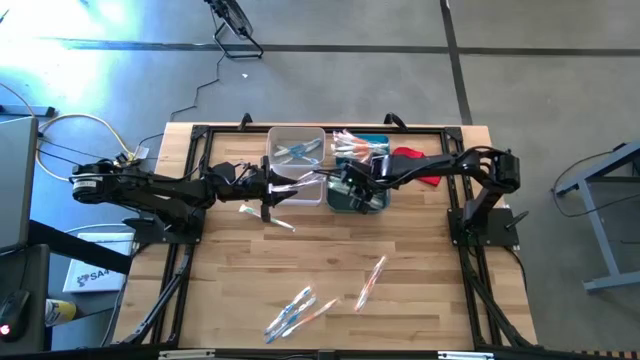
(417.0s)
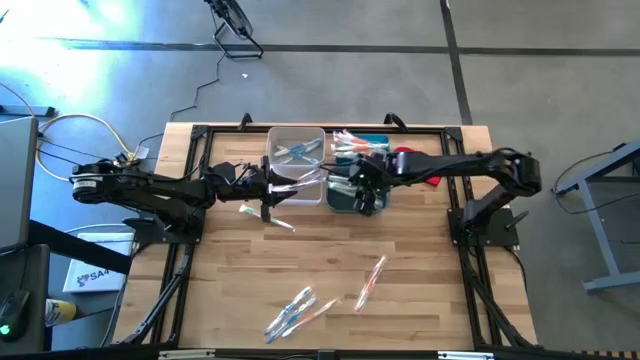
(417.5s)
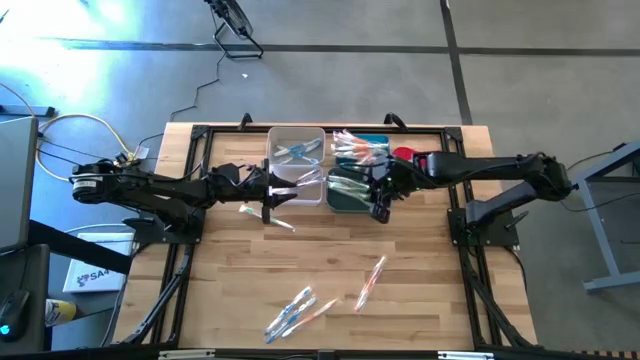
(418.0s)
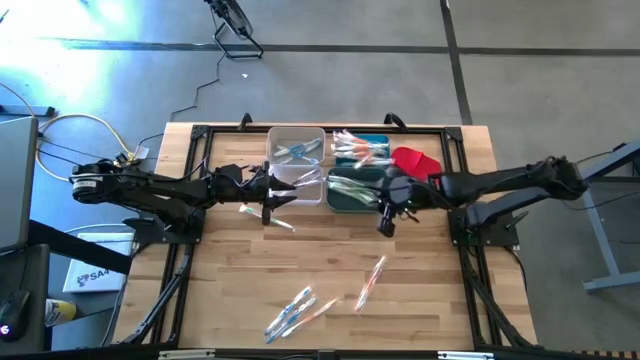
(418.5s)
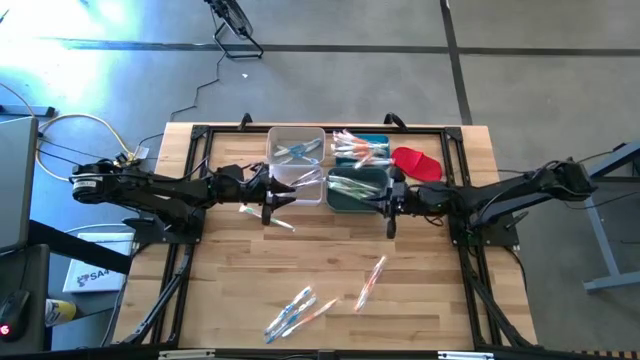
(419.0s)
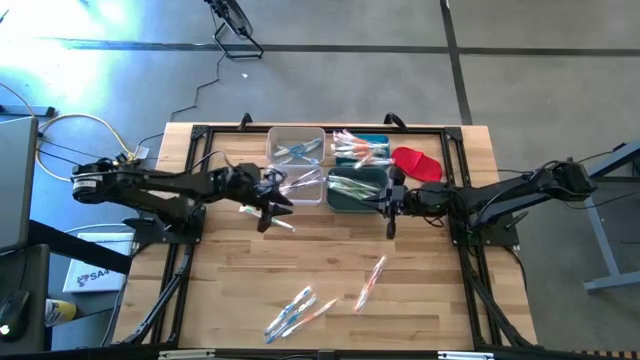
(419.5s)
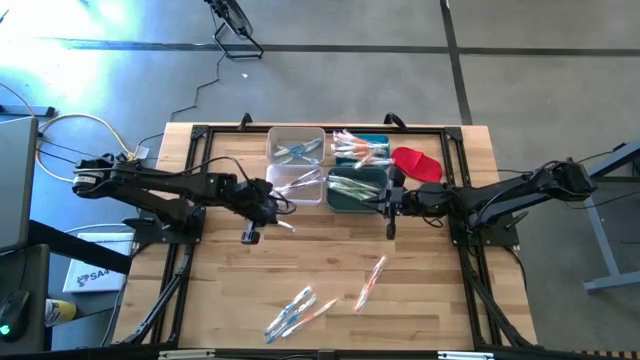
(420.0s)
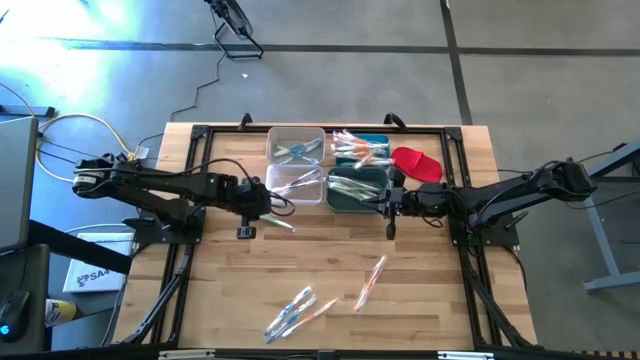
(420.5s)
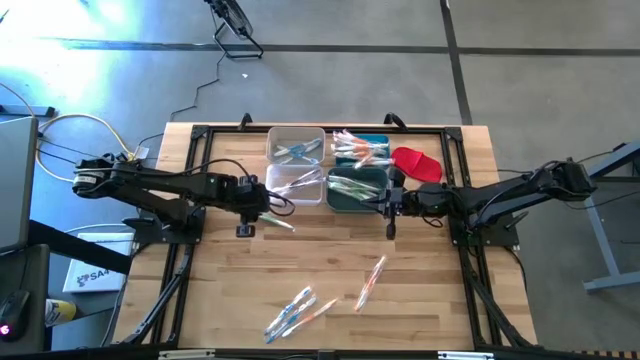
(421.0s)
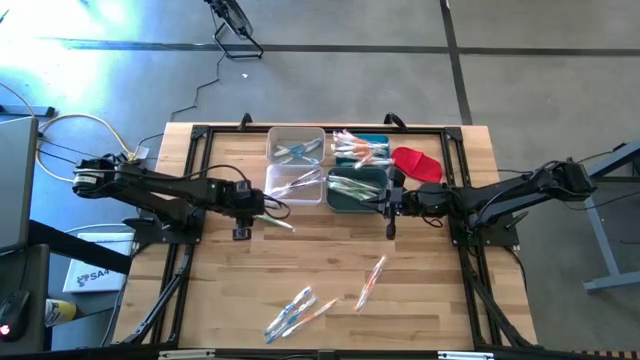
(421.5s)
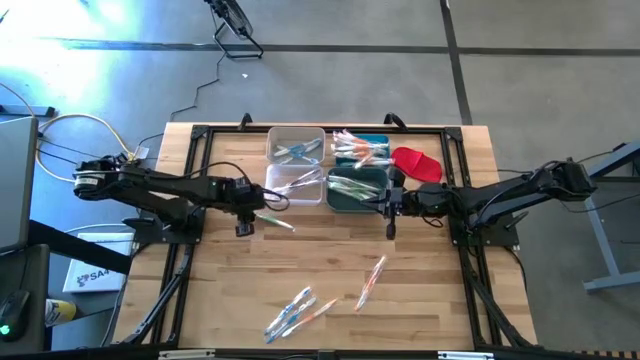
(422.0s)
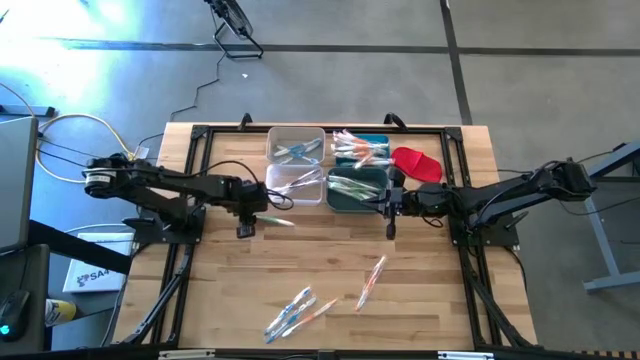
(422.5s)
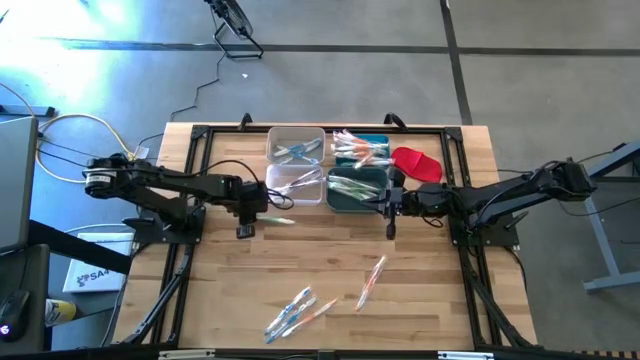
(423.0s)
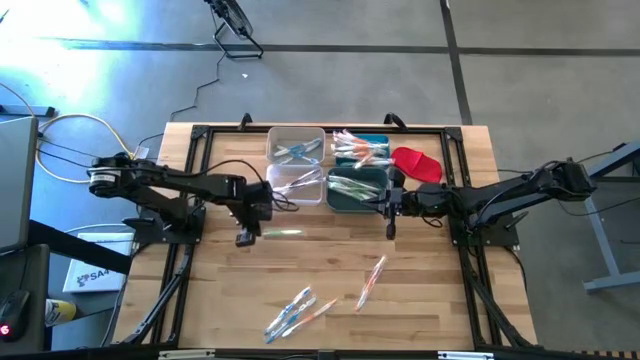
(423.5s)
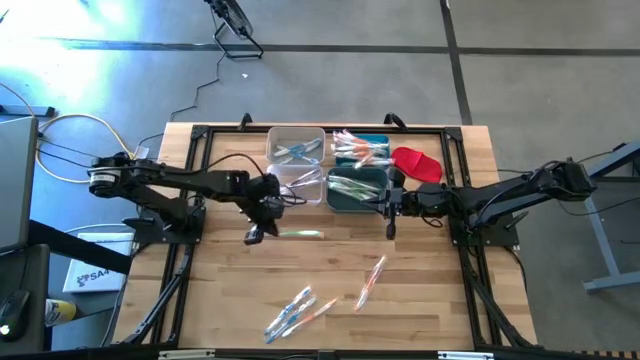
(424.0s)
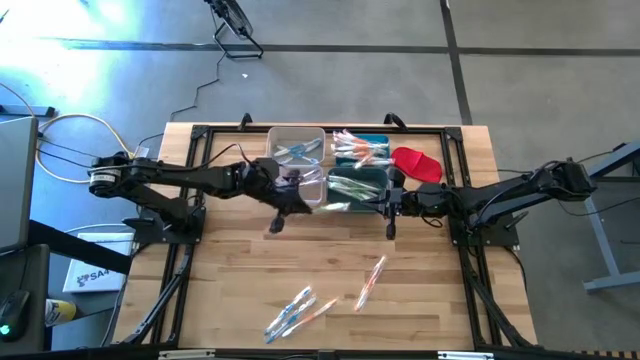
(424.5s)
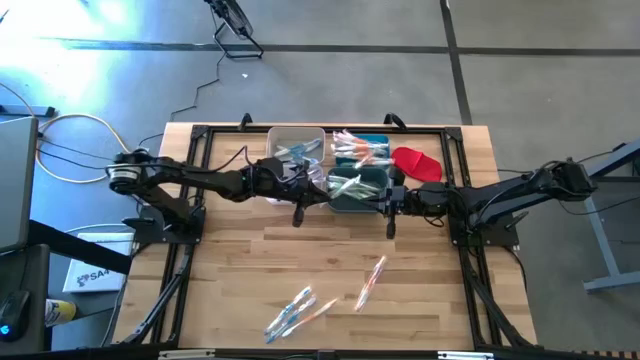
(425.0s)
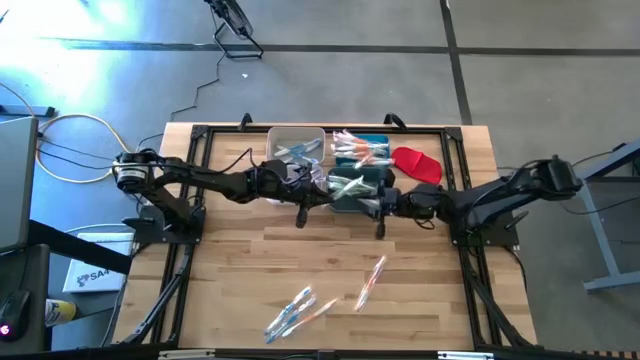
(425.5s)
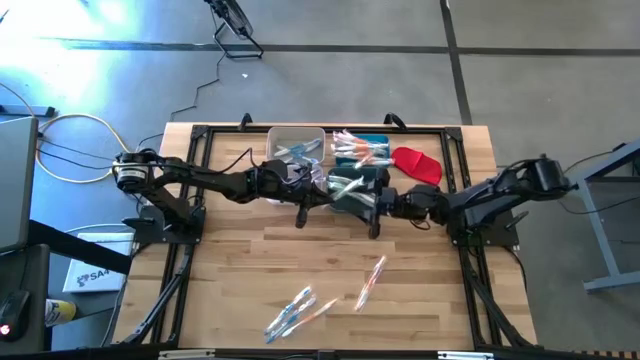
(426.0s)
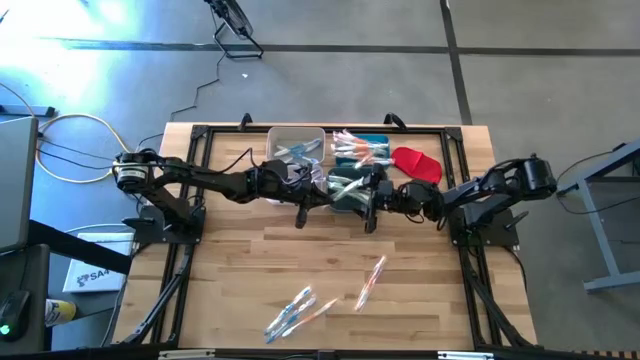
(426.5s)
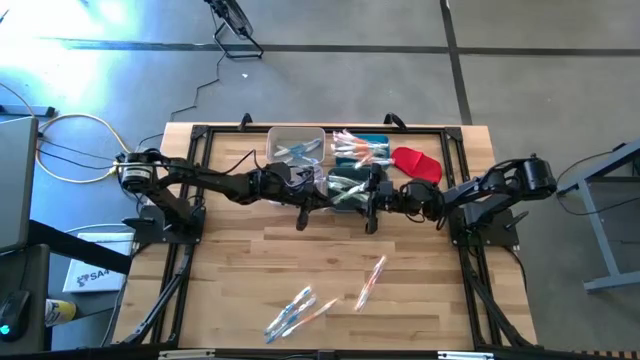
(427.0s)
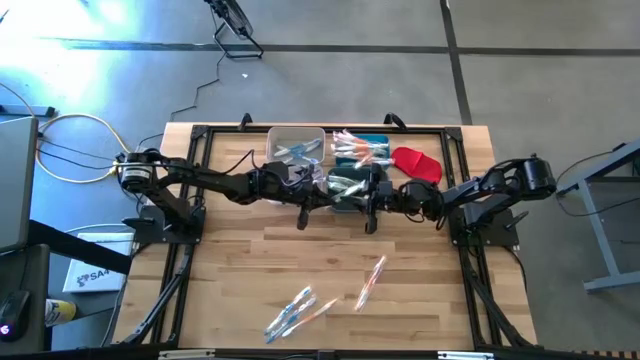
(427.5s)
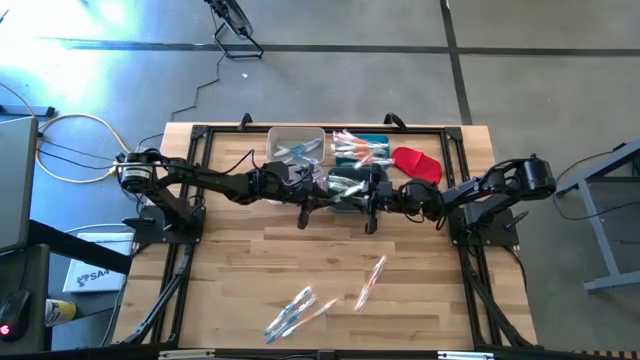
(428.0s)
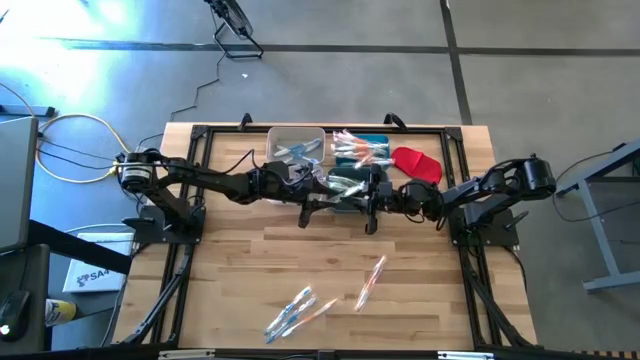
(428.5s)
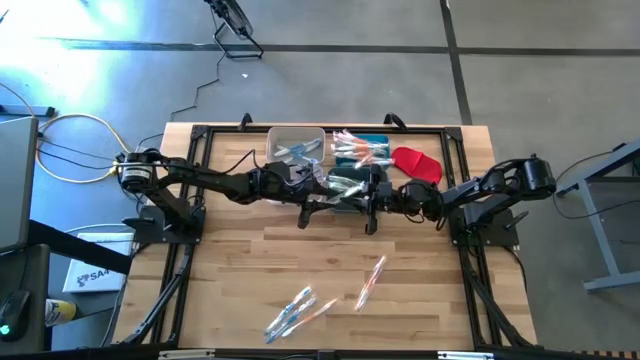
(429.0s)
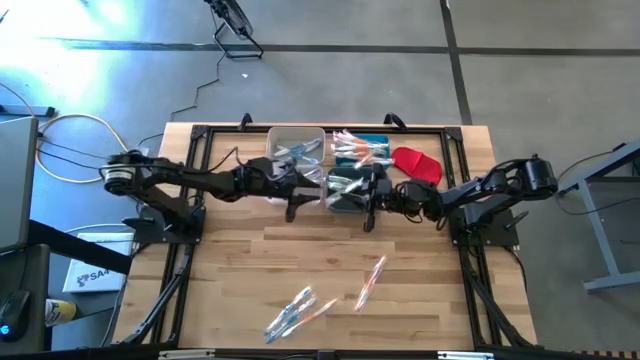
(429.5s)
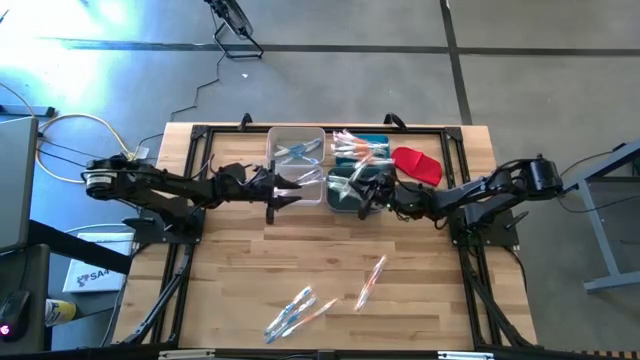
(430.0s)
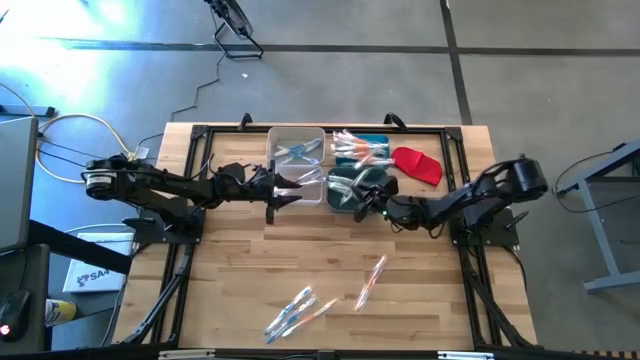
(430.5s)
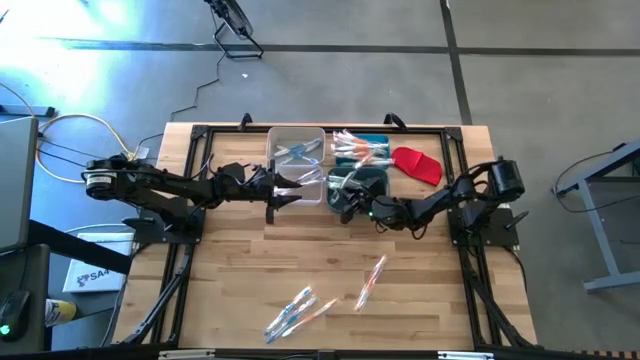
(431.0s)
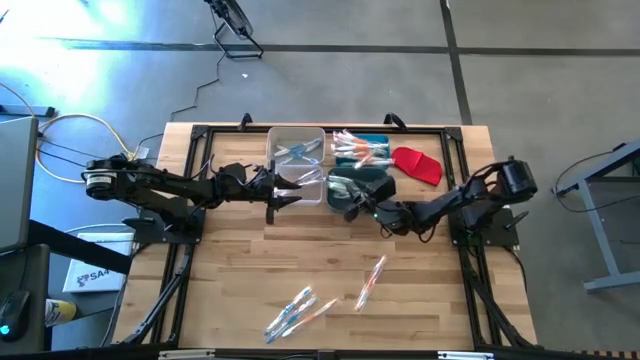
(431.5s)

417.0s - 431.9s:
Task: Pick & Place Toothbrushes
Put the green toothbrush into the green bin

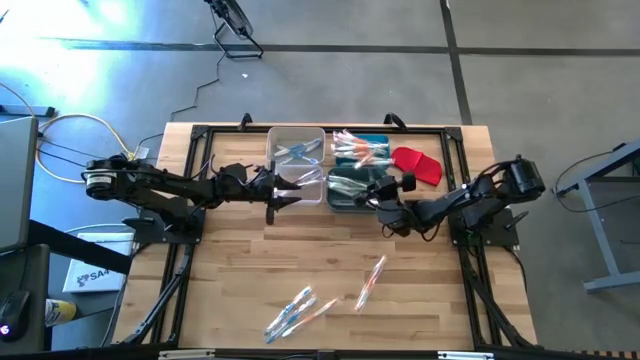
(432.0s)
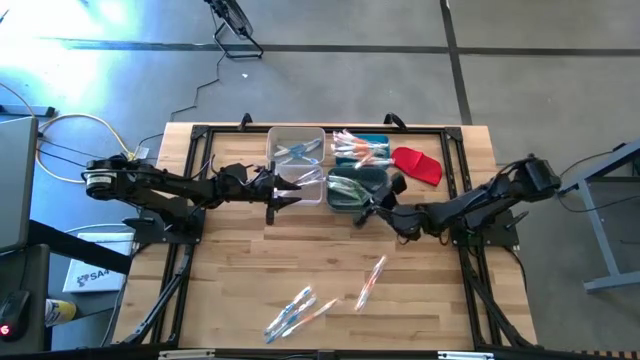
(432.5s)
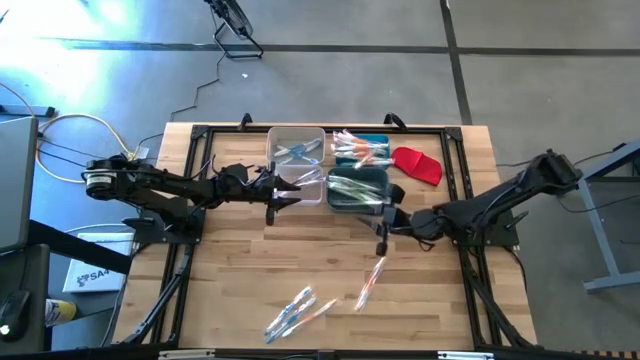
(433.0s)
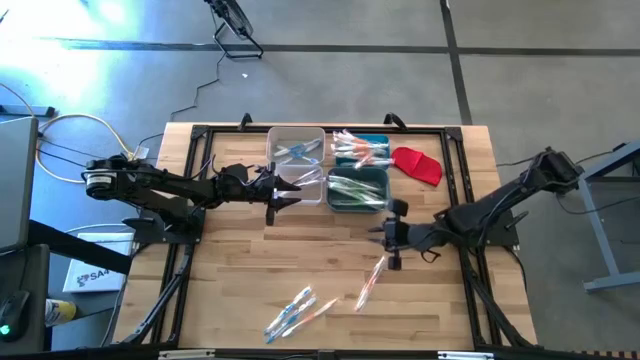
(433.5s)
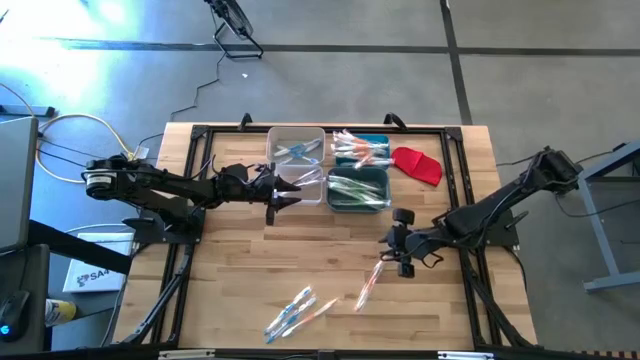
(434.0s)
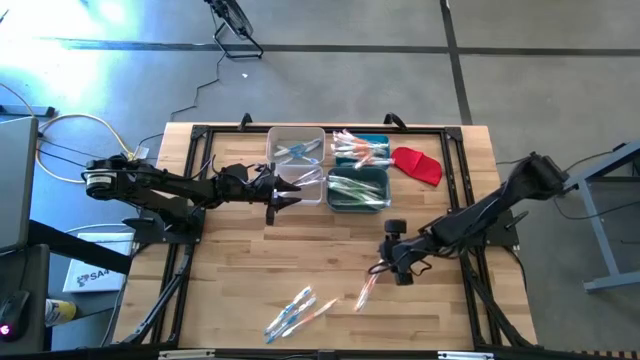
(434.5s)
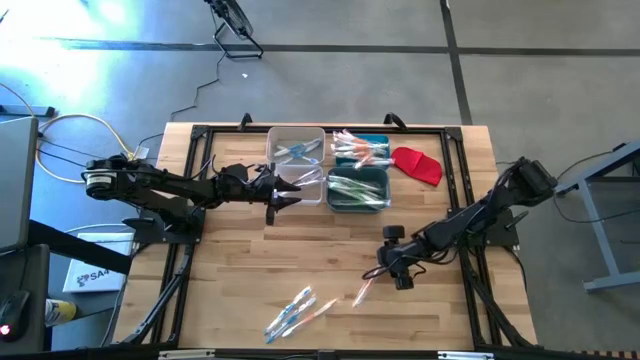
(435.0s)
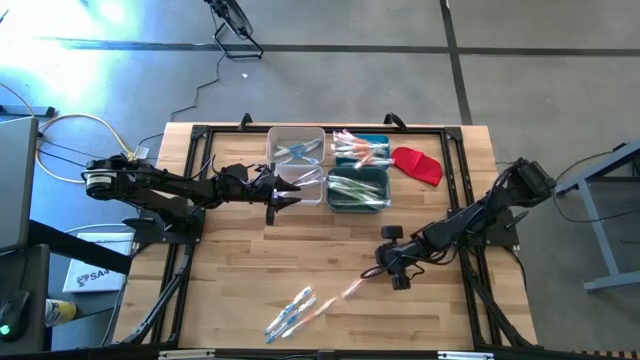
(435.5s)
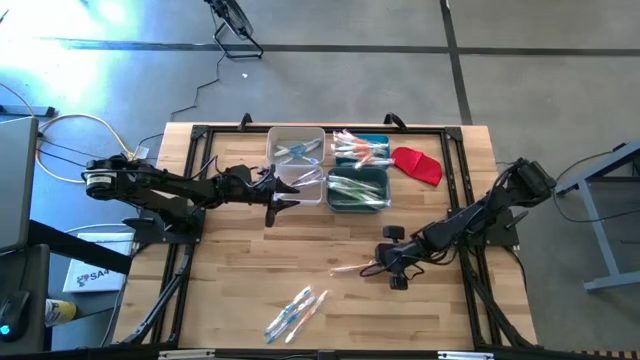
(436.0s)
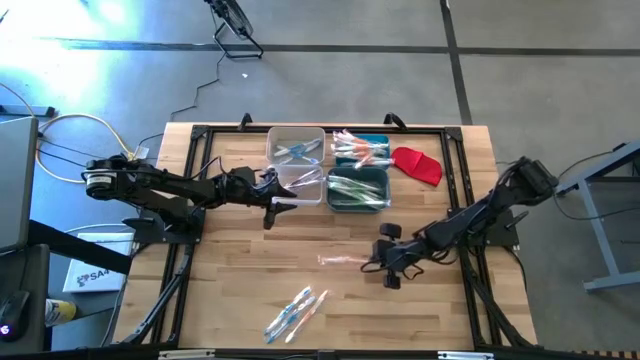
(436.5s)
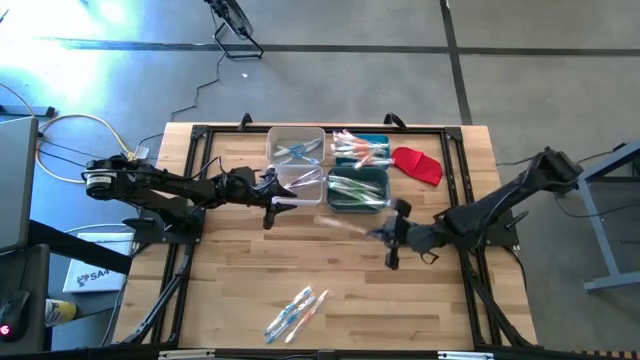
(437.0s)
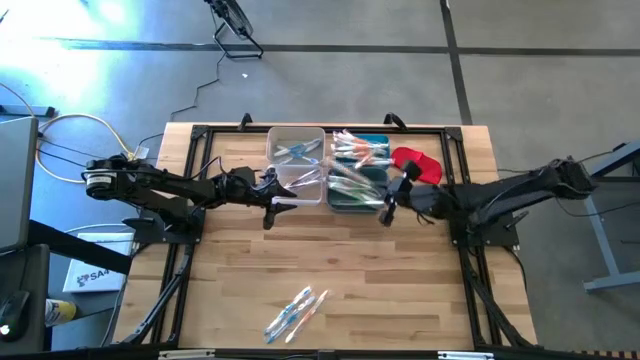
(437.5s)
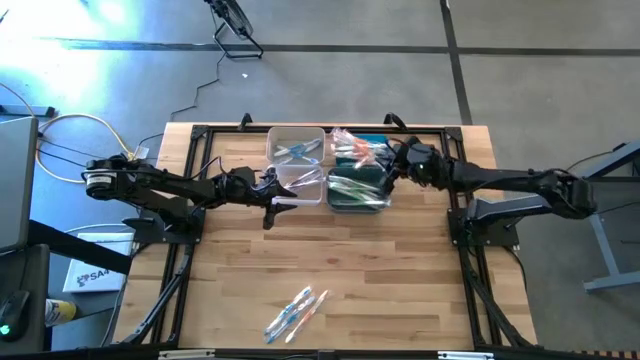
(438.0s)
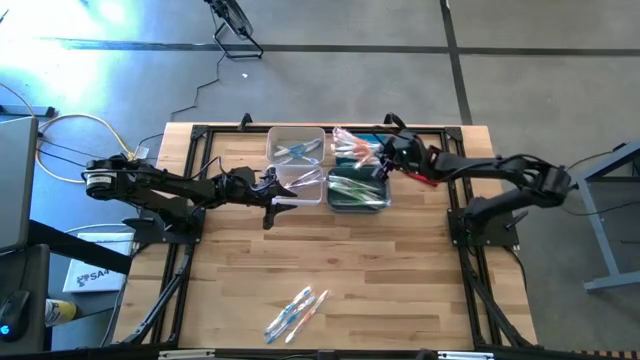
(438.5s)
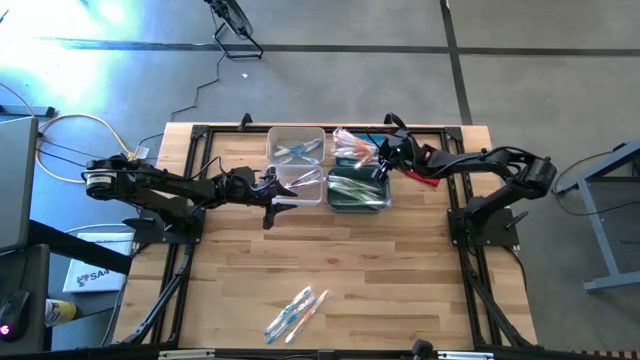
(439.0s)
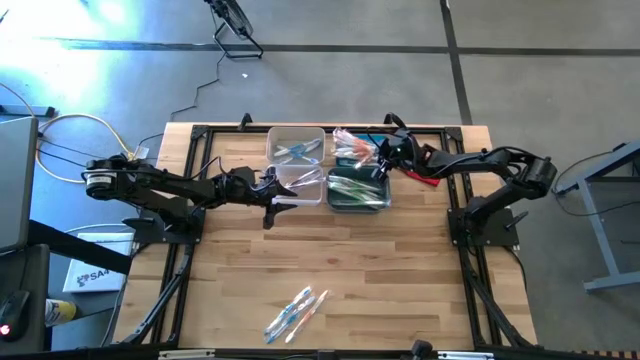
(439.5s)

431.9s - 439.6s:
Put the orange toothbrush into the blue bin
